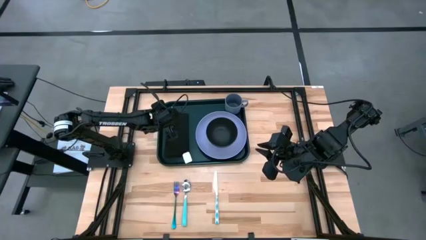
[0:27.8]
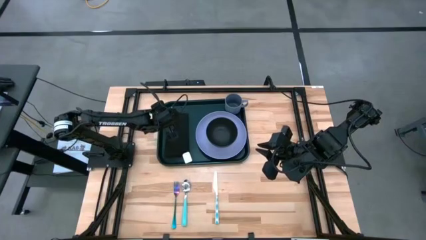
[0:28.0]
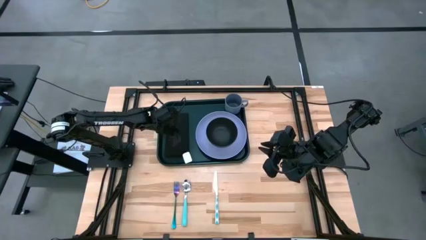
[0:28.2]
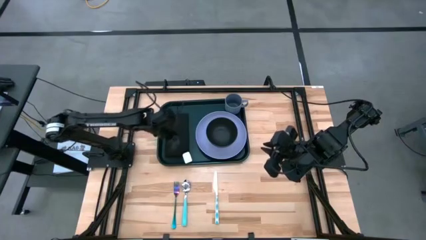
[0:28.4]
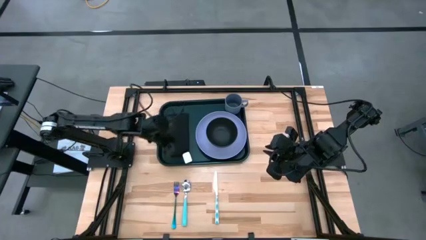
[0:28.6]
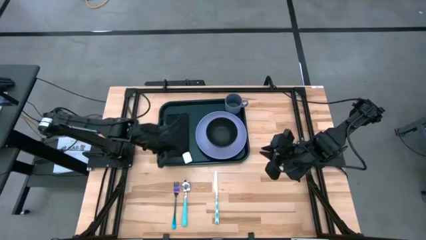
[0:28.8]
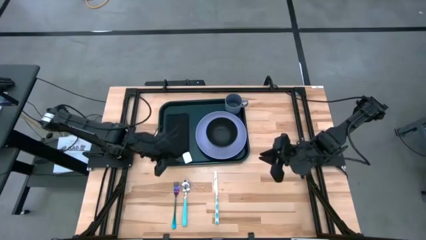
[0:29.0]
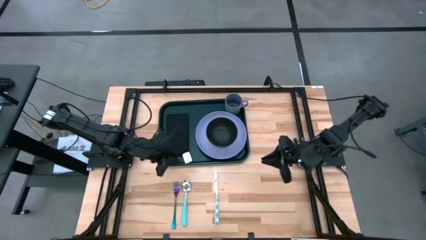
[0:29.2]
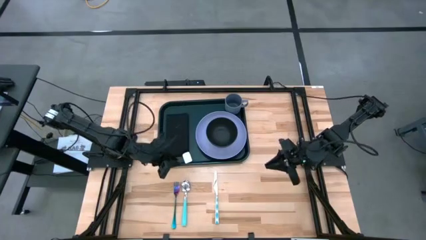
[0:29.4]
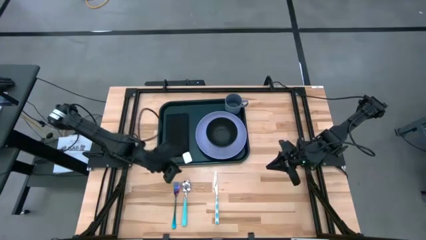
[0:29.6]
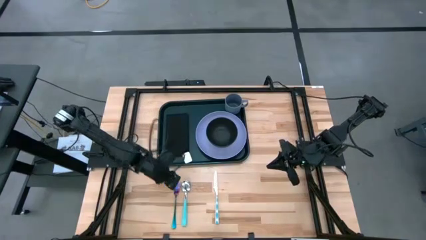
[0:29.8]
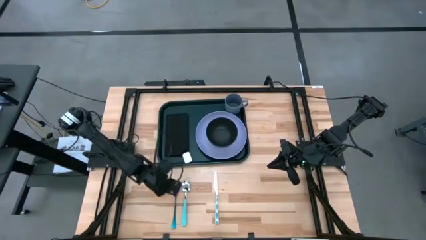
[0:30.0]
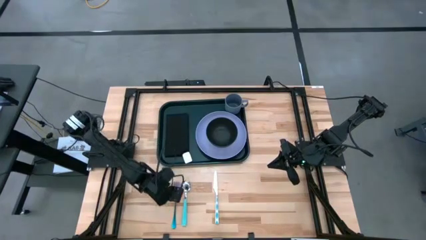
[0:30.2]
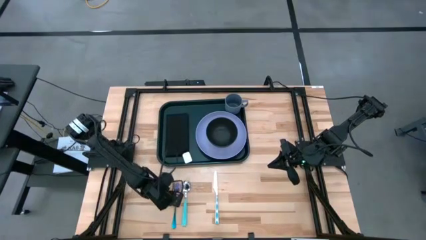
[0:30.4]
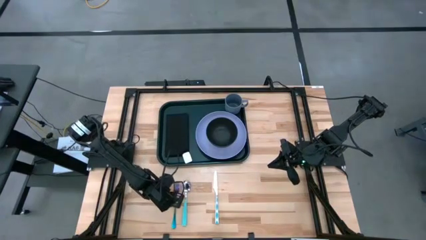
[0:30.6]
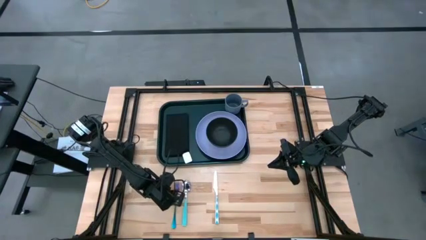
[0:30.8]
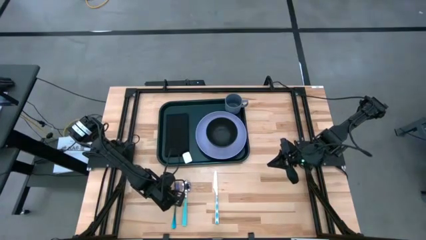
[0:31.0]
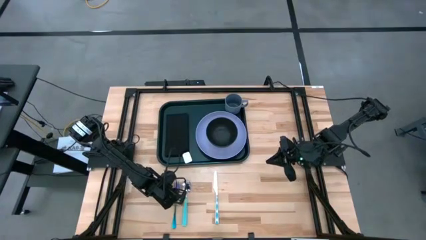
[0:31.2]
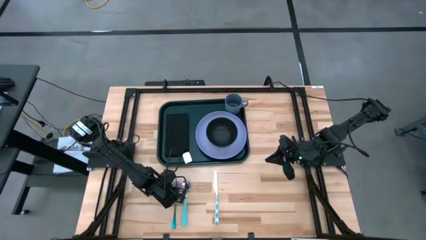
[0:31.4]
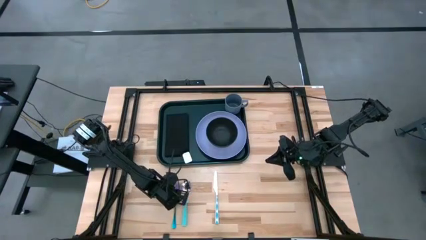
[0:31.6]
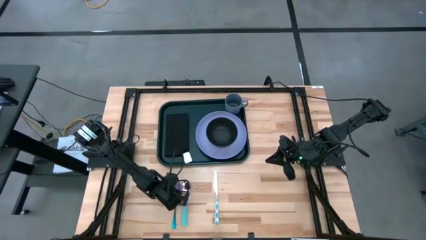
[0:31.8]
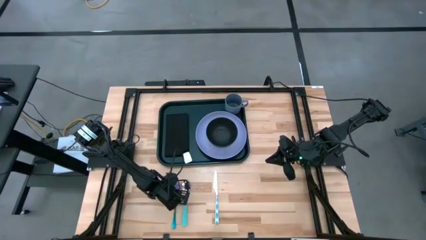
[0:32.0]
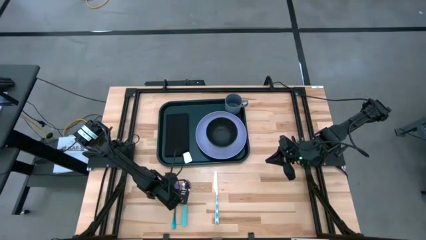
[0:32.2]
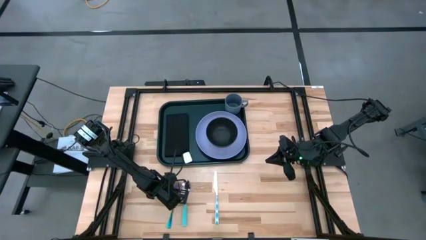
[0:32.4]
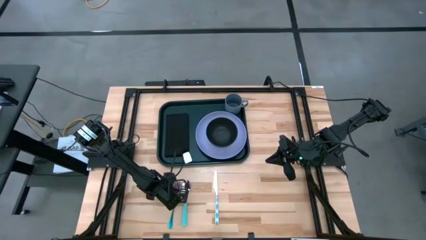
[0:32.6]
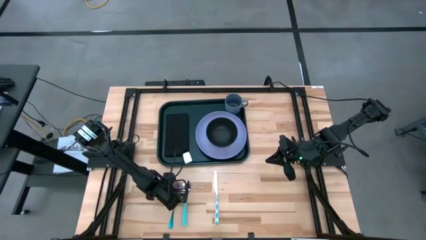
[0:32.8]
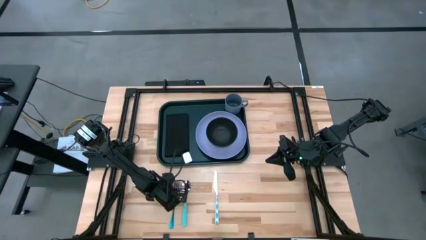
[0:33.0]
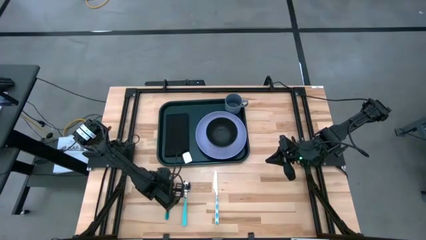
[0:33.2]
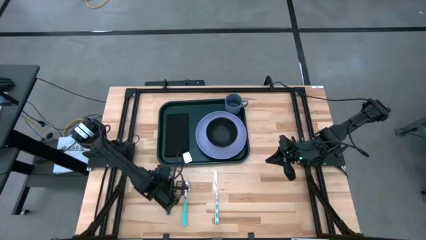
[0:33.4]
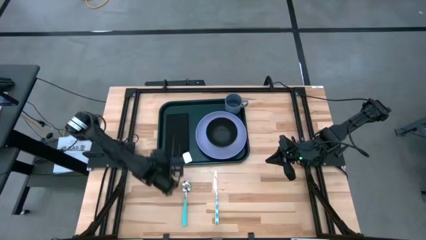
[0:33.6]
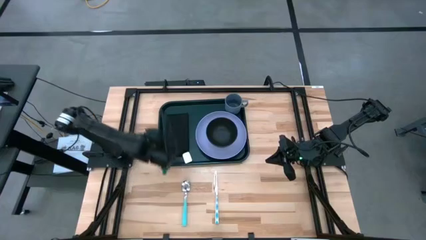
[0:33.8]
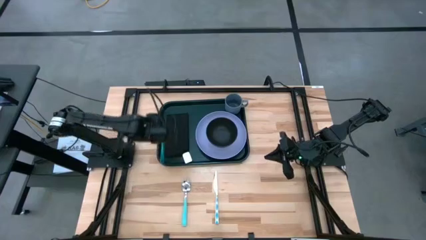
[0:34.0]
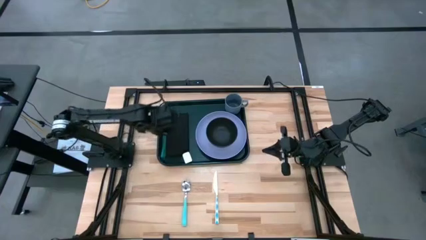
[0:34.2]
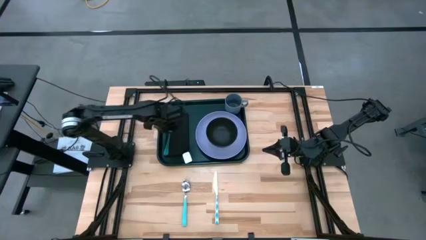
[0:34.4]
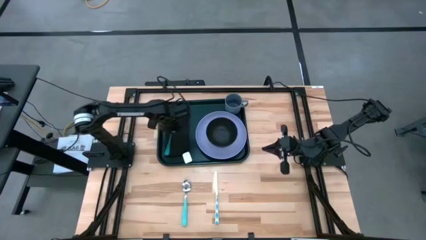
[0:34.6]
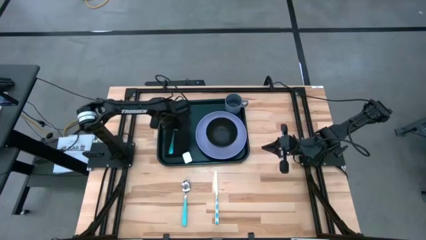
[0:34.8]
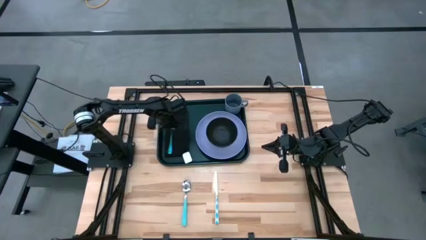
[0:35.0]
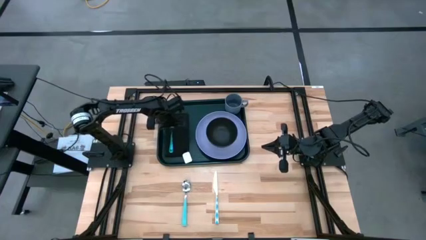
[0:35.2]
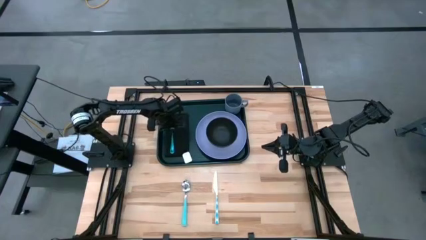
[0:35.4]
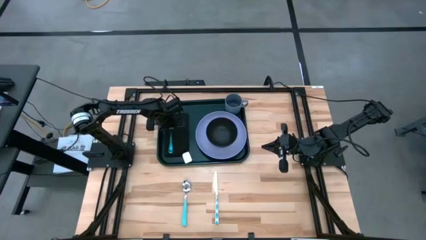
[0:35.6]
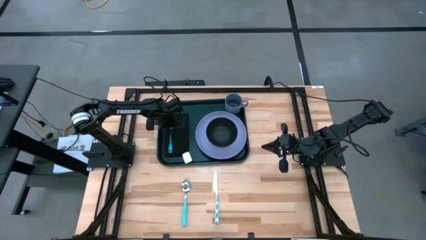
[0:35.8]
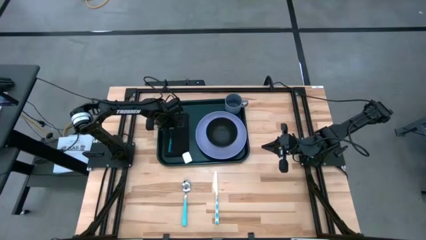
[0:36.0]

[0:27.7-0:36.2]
Task: Set up tray
Put the blue fork on top of the black napkin on the black serving tray

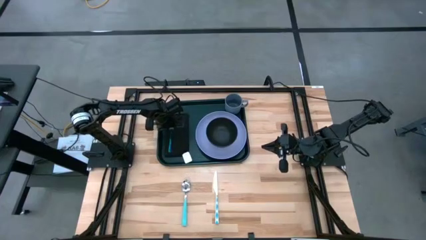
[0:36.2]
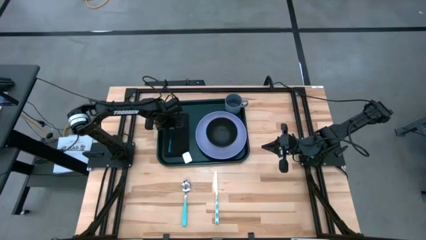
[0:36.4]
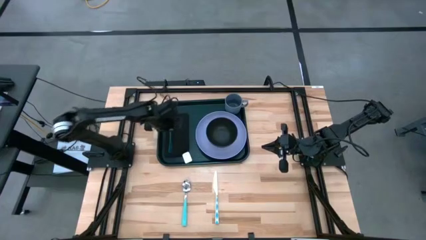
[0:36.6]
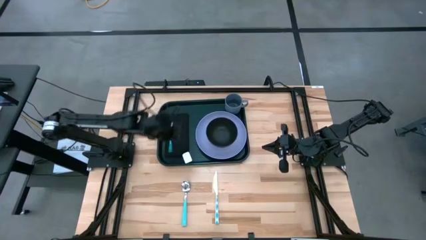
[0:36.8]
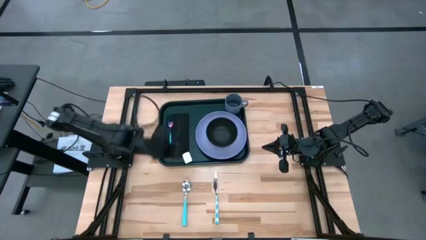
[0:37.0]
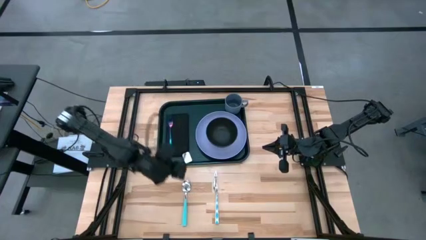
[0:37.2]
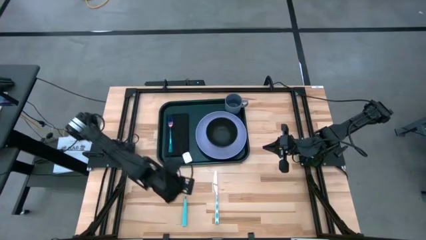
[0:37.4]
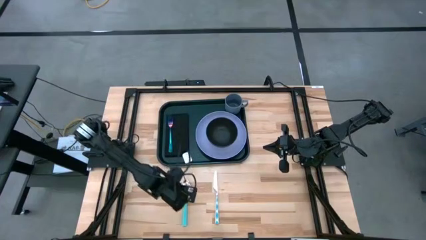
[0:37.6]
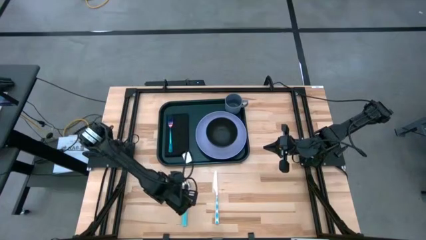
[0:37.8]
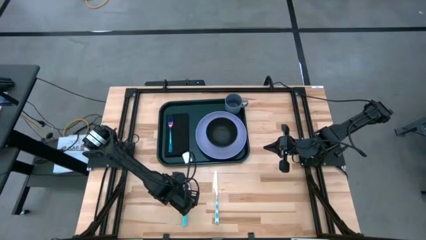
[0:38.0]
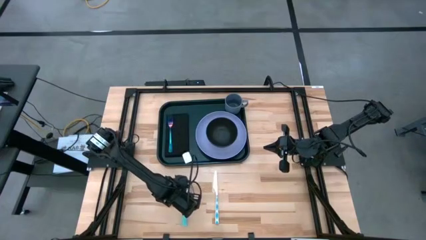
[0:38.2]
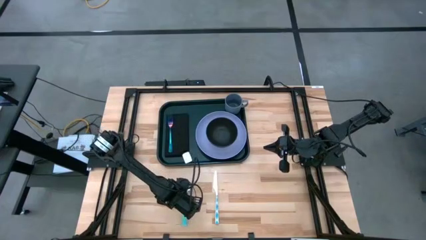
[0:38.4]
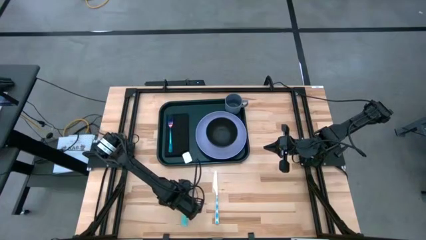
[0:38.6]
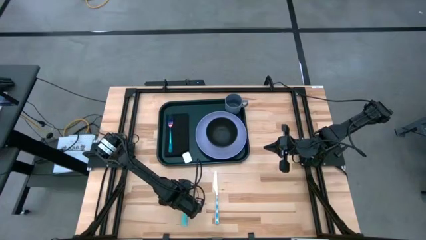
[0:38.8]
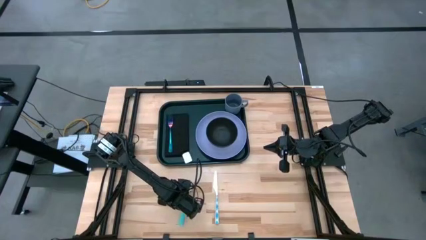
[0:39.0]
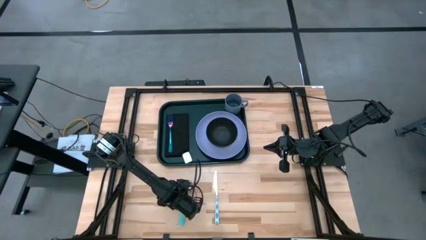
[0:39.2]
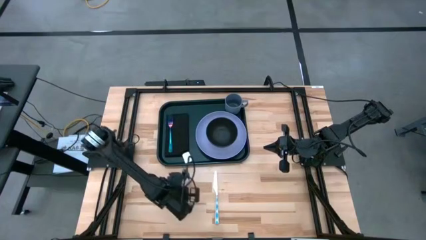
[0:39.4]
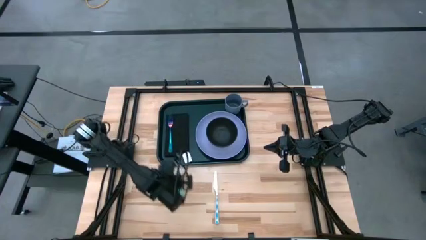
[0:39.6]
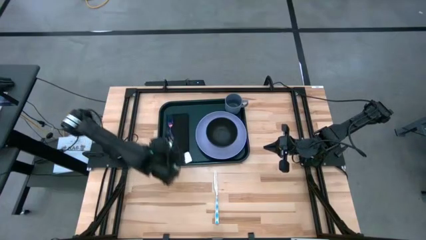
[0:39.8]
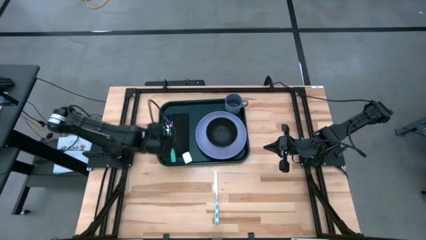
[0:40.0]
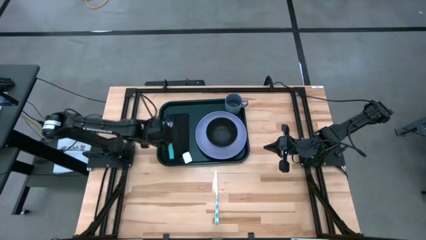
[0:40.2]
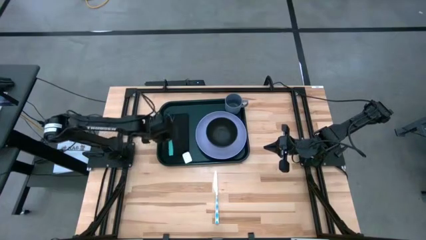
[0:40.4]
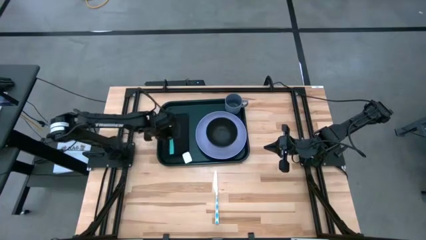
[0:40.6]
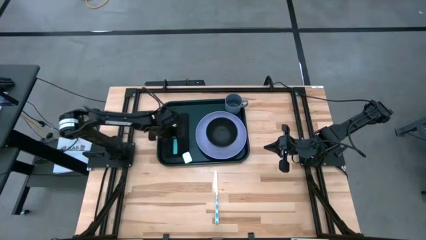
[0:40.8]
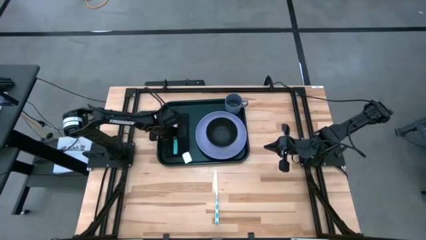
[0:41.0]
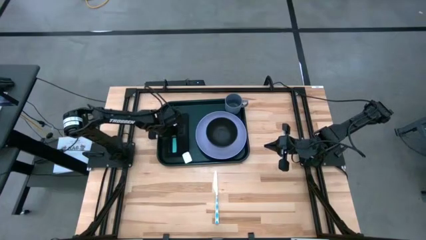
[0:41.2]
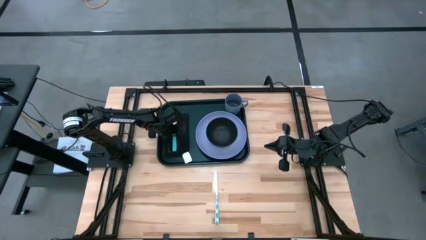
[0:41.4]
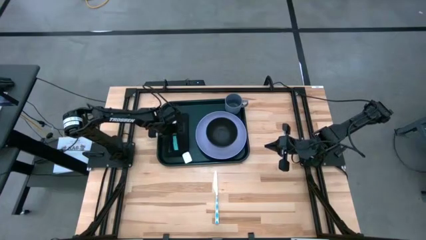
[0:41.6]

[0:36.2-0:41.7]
Put the light blue spoon on top of the black napkin to the right of the blue fork on the black serving tray

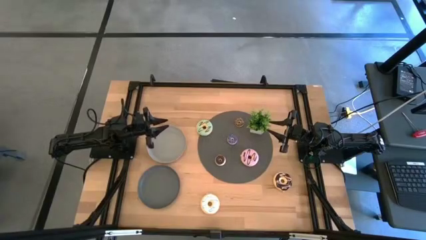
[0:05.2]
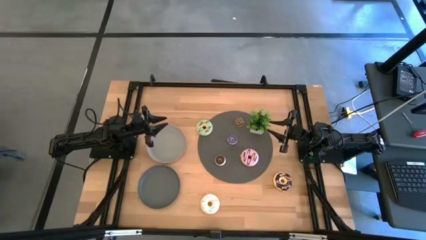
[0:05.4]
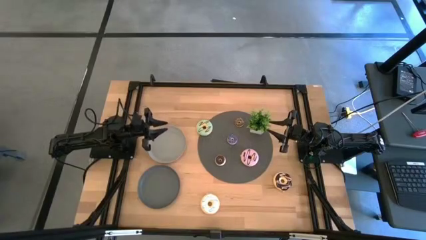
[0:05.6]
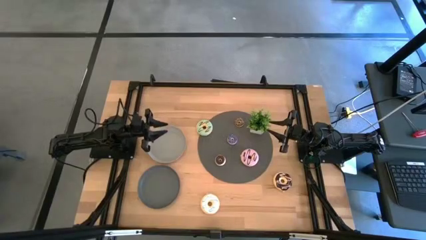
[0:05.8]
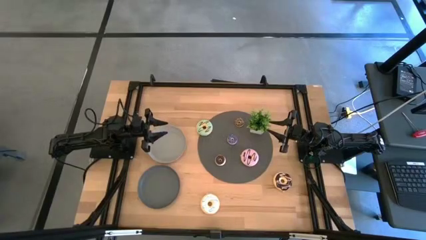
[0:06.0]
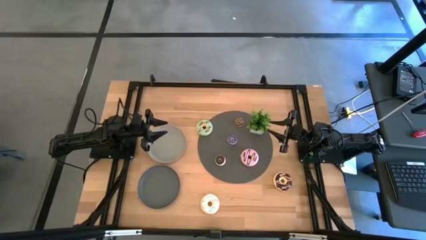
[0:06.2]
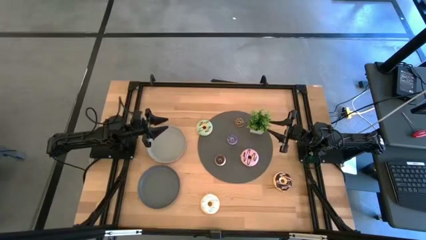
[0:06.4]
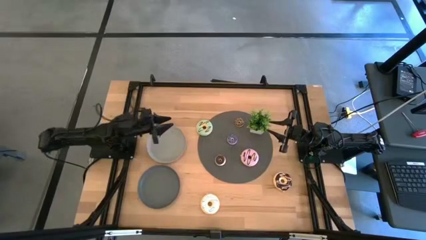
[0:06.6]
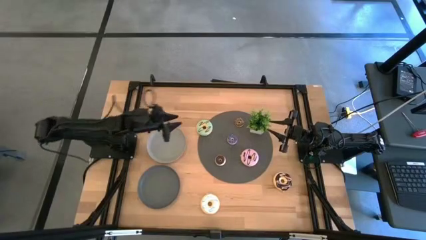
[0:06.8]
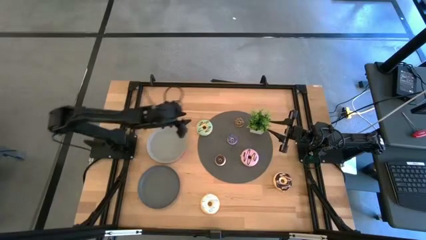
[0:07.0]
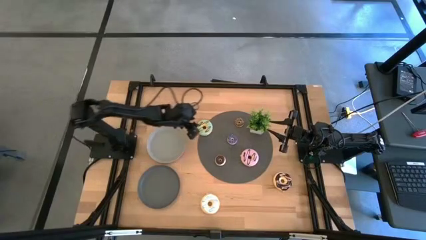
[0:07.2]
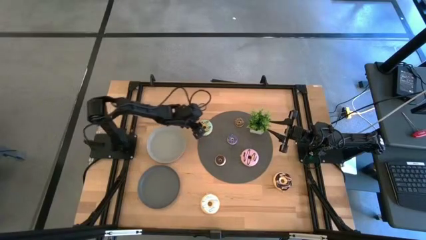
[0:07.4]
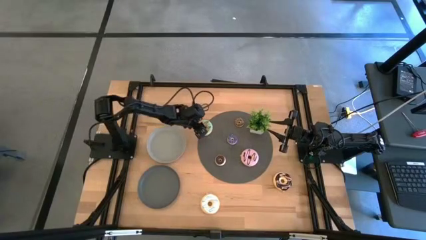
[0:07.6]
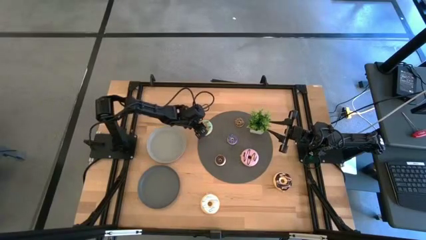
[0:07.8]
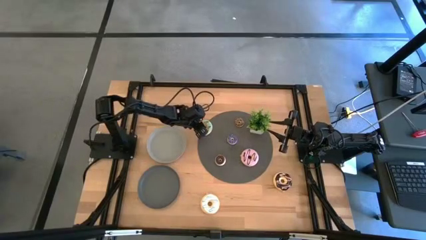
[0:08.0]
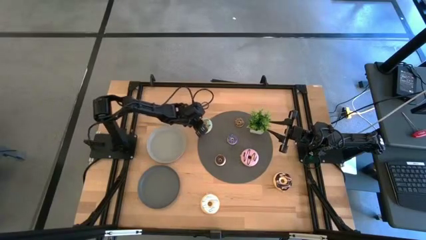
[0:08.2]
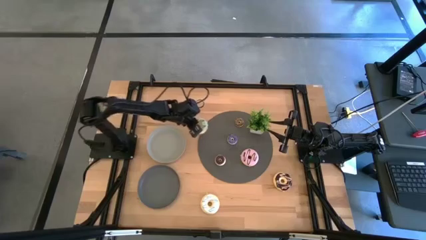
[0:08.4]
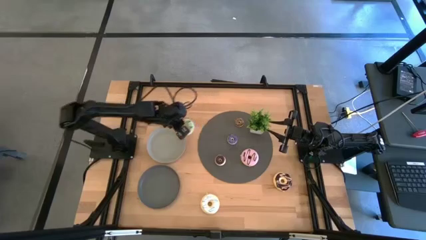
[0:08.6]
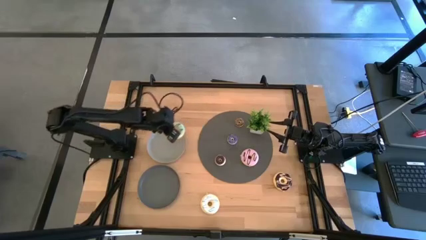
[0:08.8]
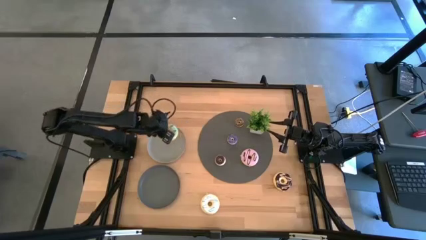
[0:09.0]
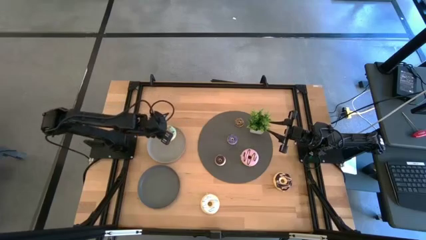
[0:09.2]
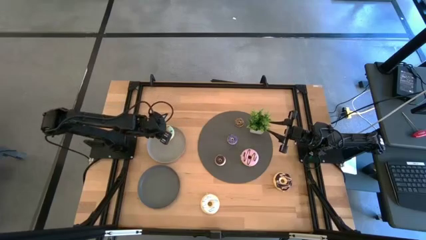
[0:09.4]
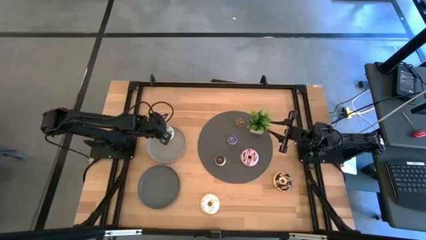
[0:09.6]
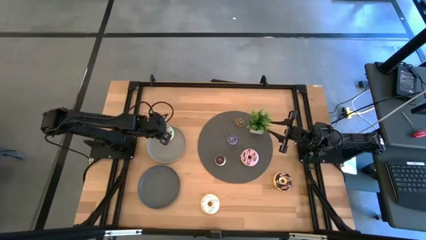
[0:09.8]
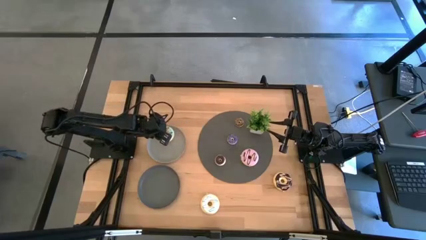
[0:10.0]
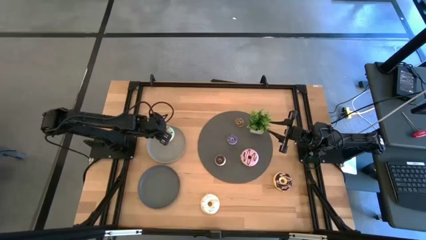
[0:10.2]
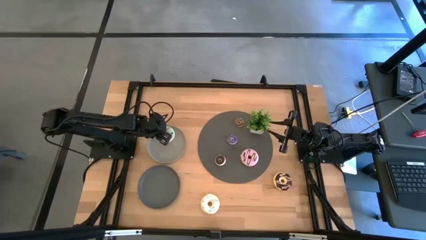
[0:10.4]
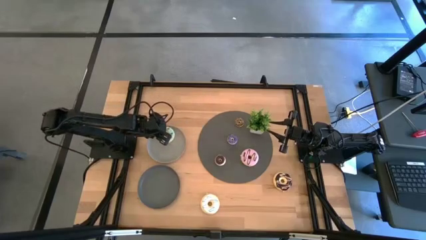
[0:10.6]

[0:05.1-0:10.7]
Task: Pick & Place donuts
Put the big blue donut on the light gray plate
